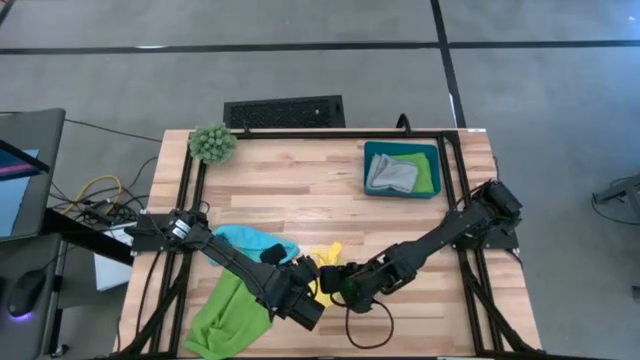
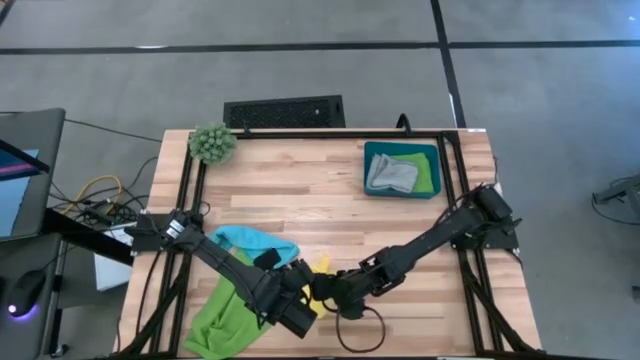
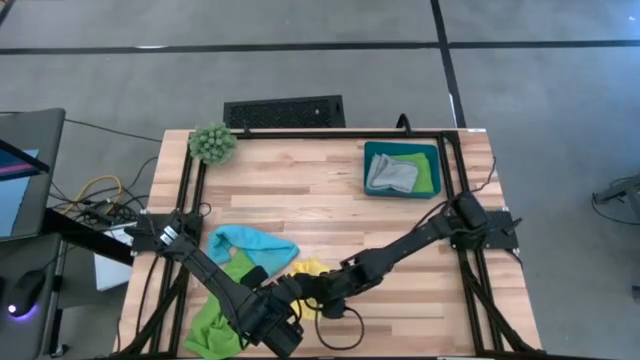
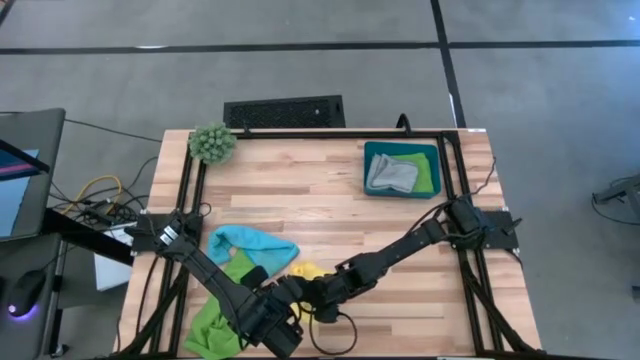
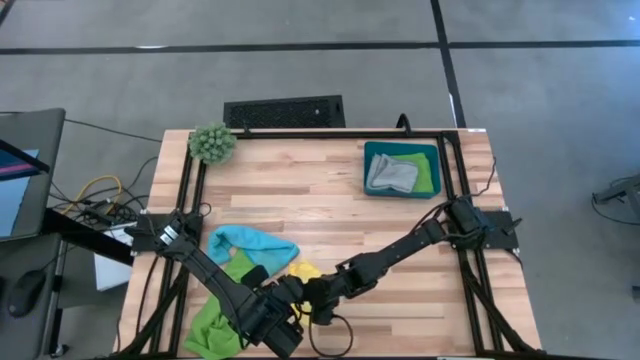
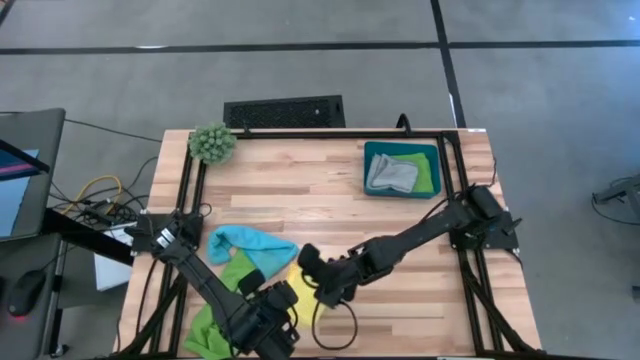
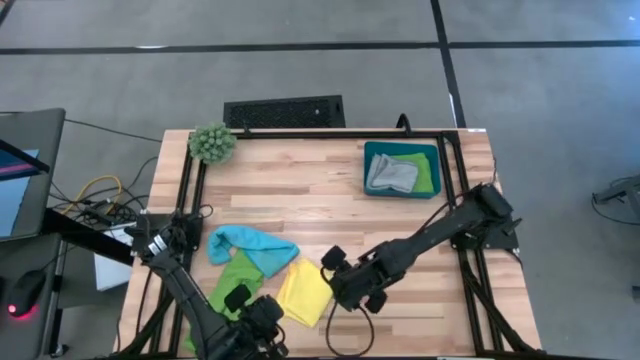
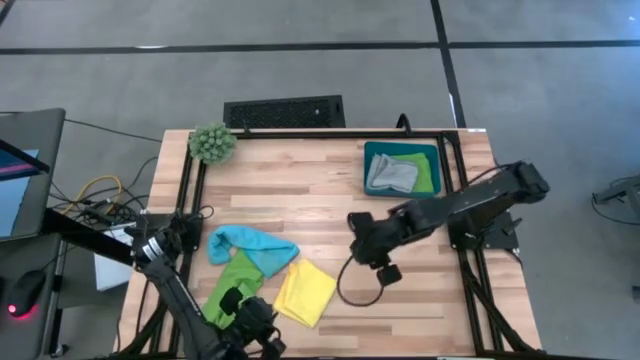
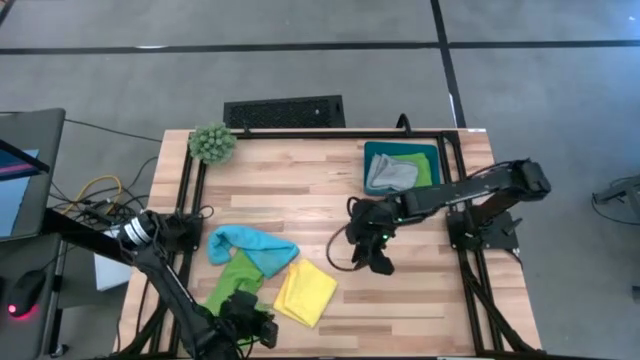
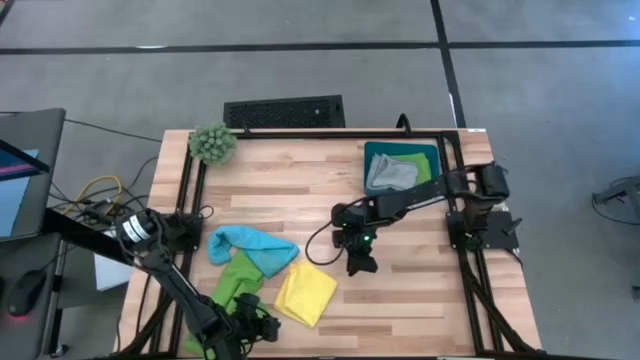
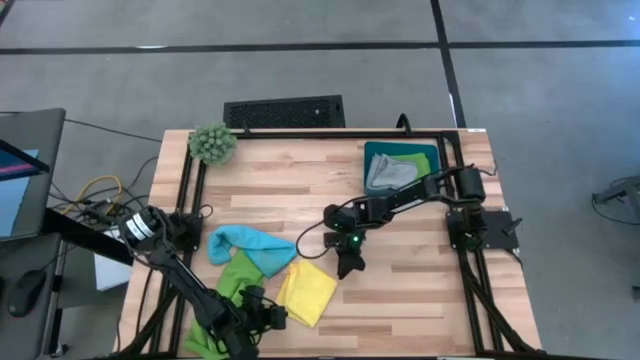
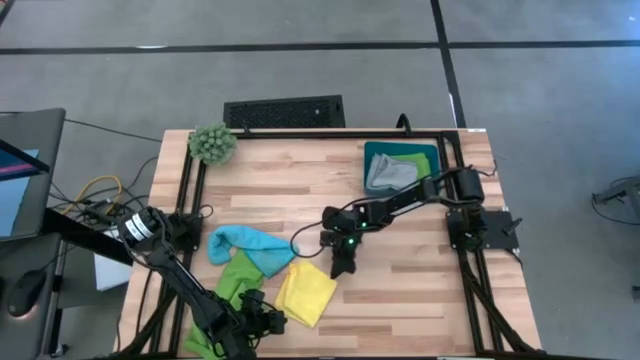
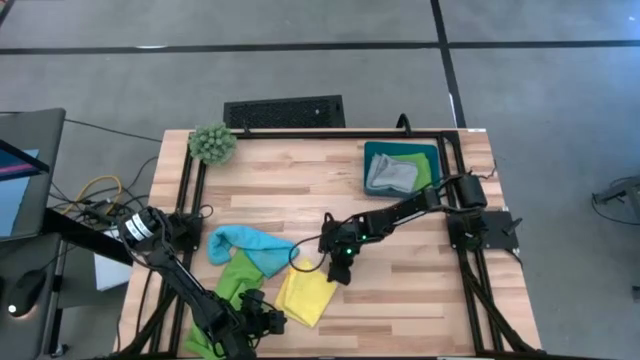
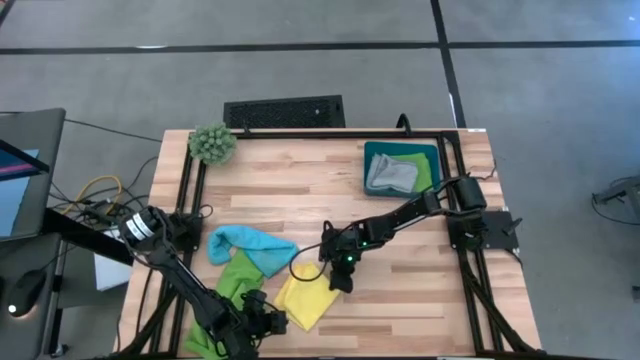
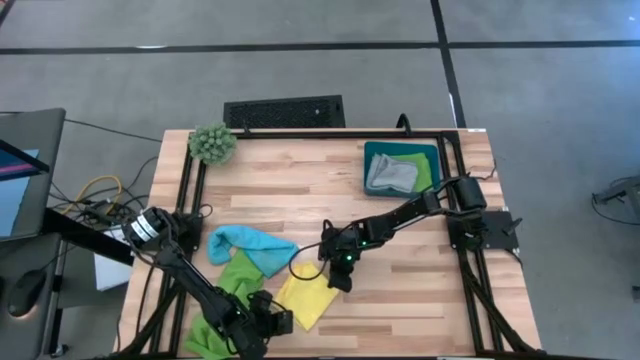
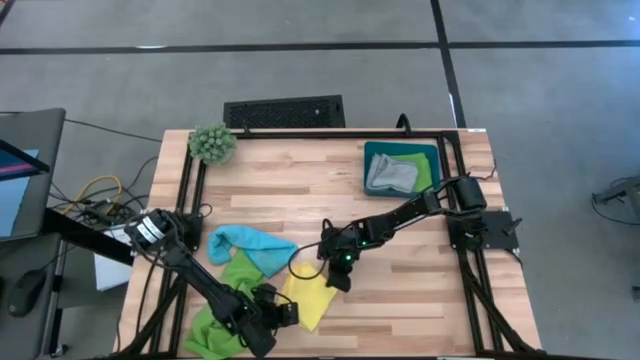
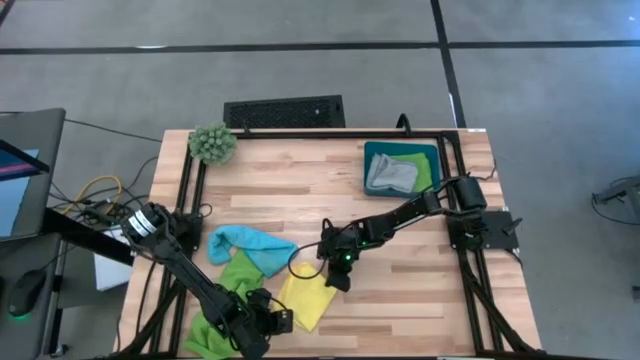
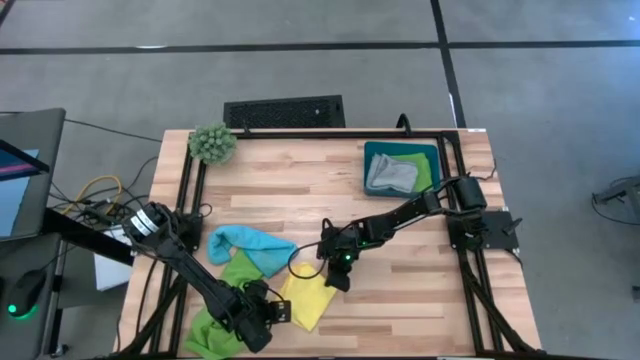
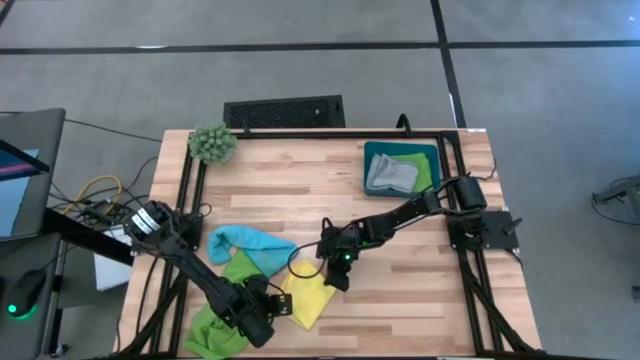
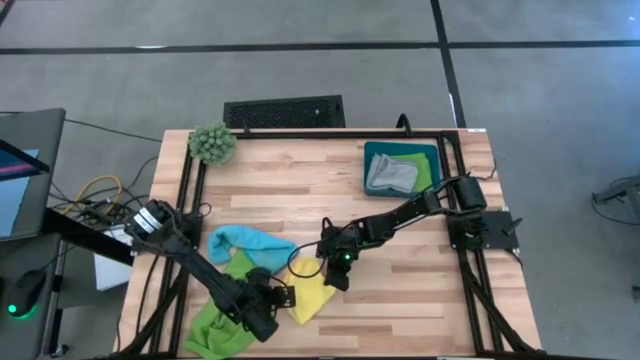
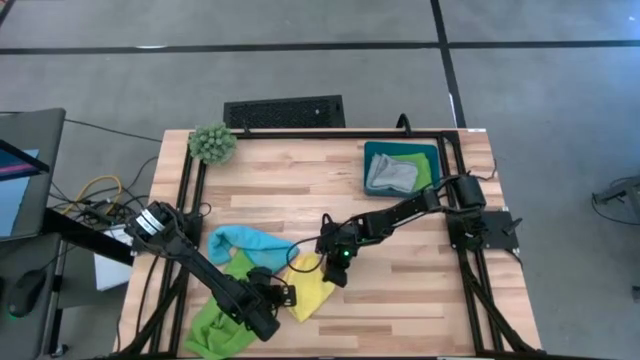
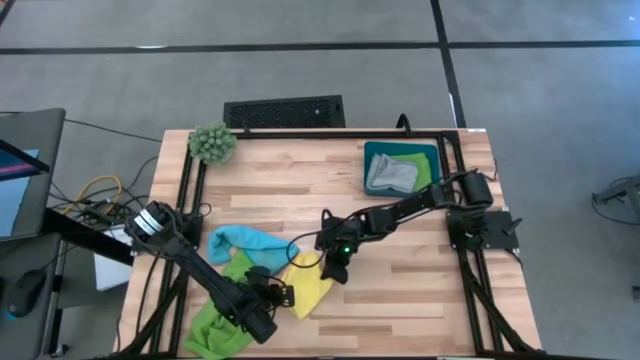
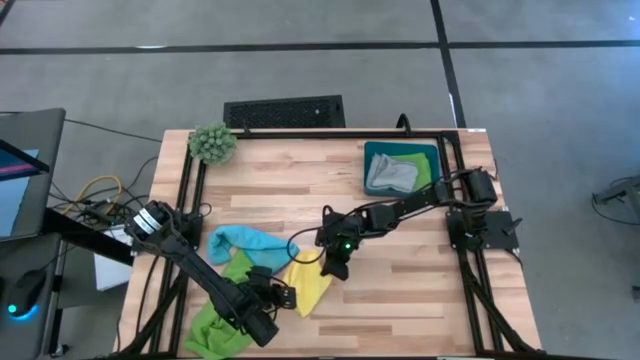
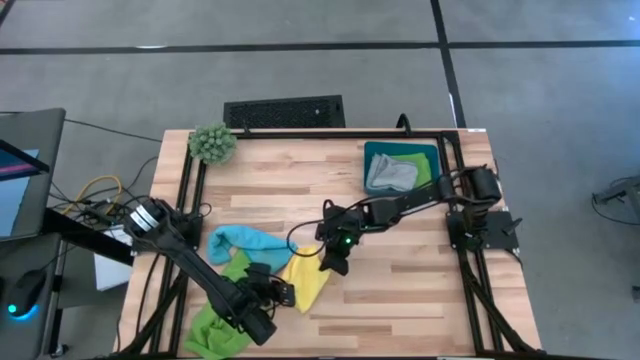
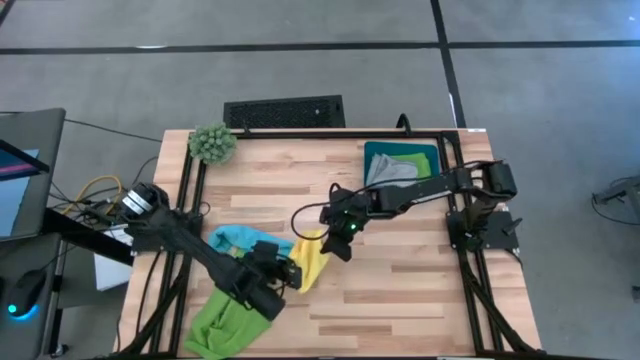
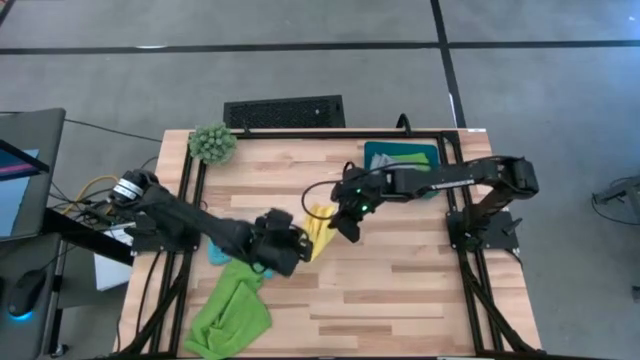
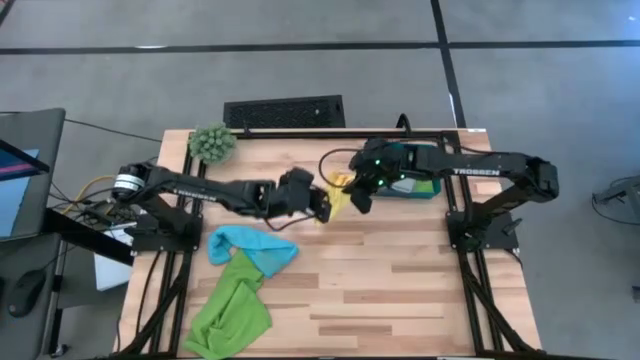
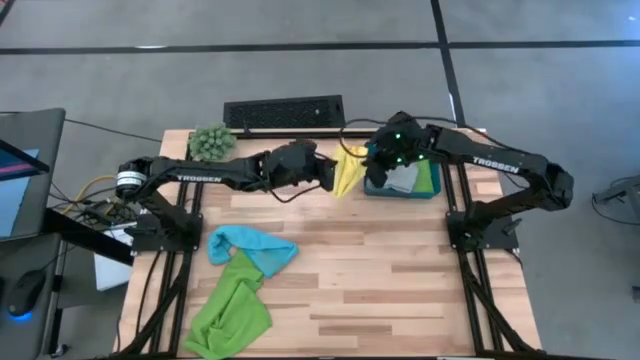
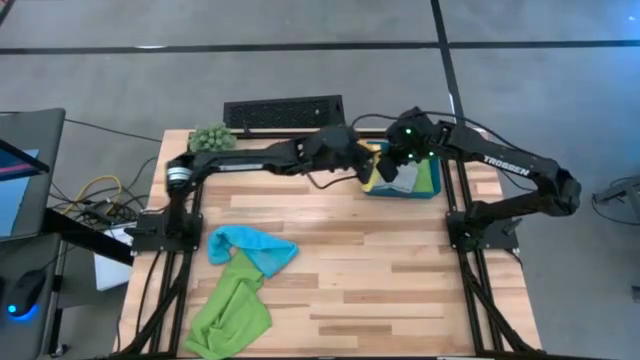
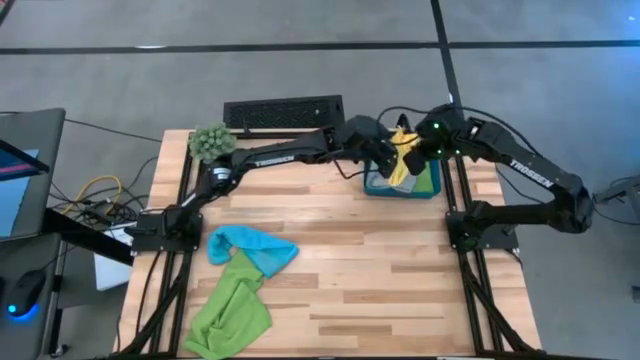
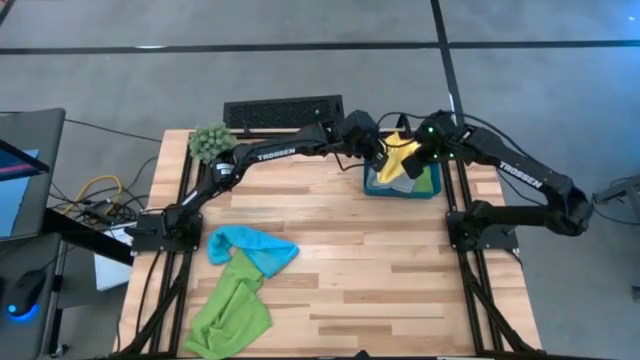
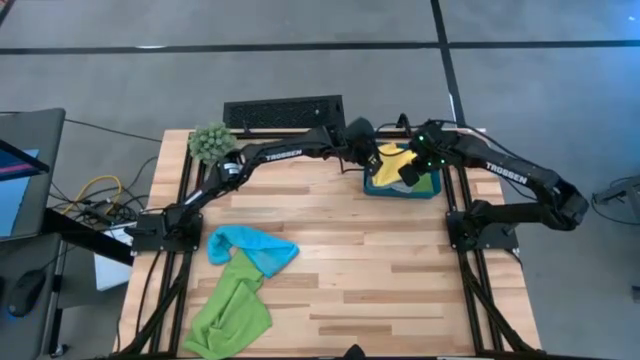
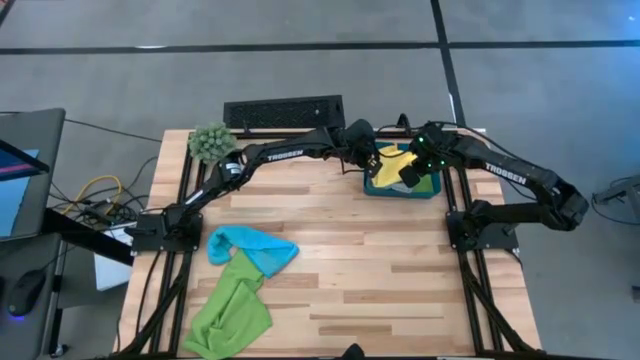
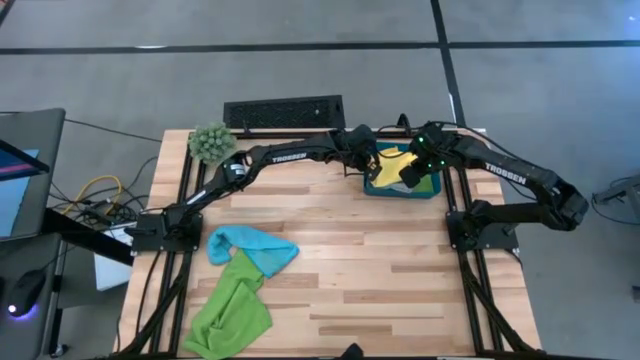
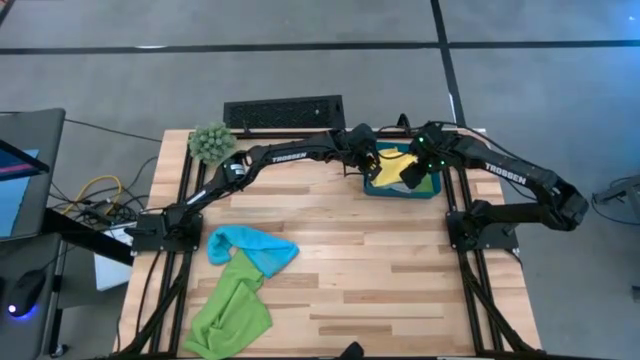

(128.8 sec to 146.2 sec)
Task: Fold microfiber towels
Fold the yellow microfiber cloth

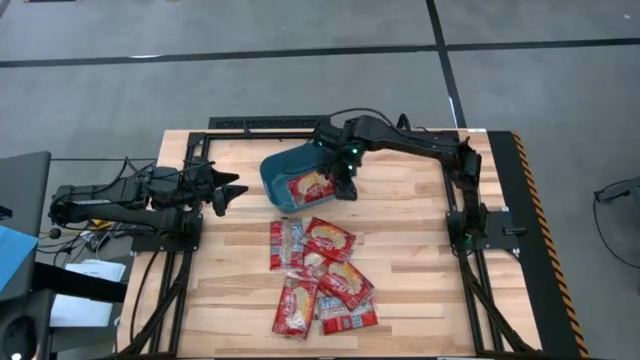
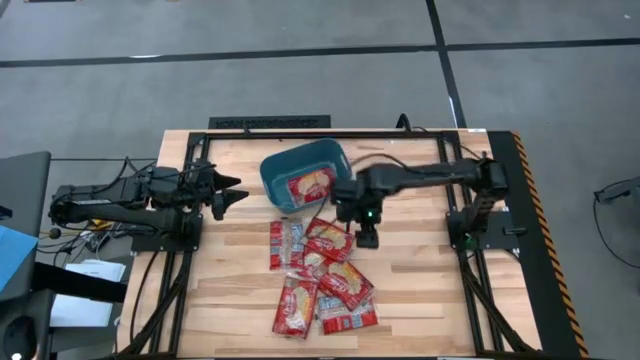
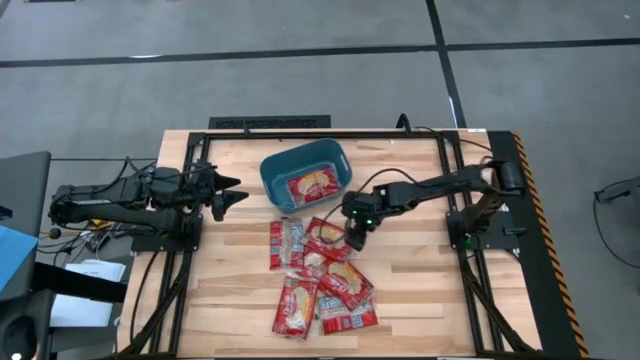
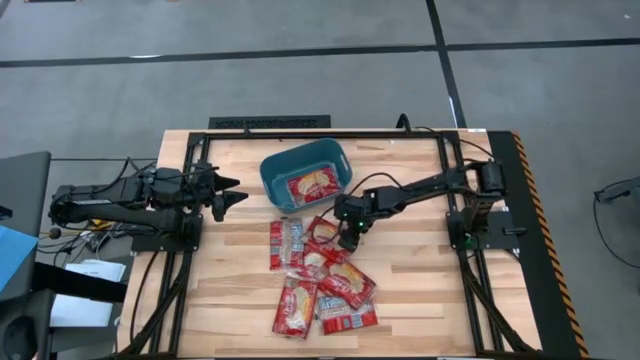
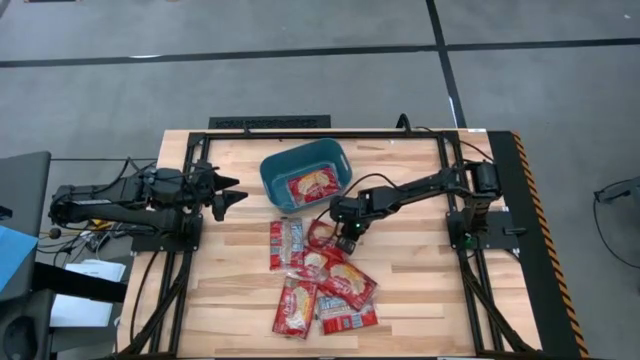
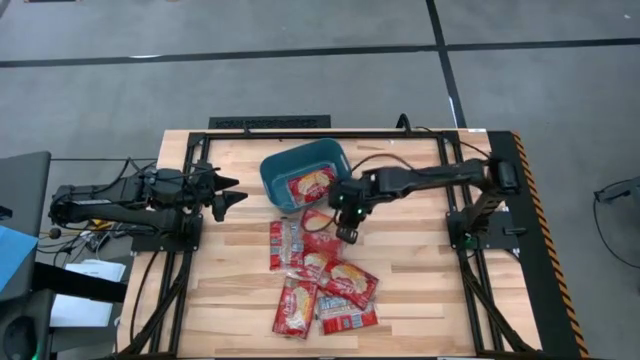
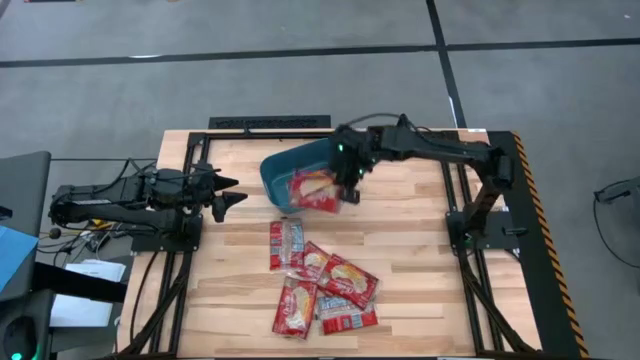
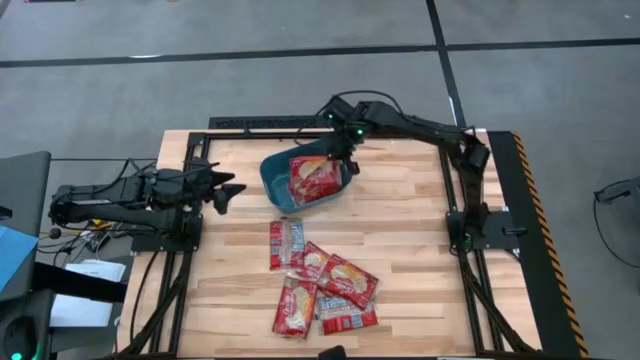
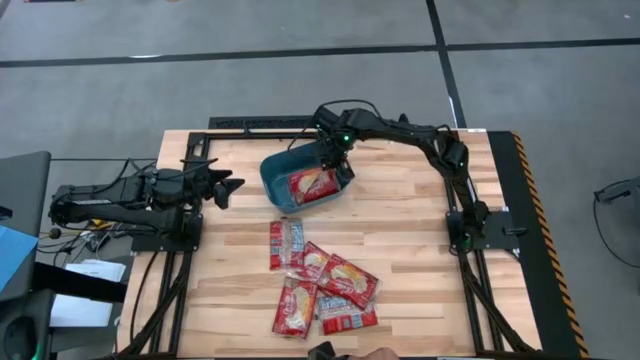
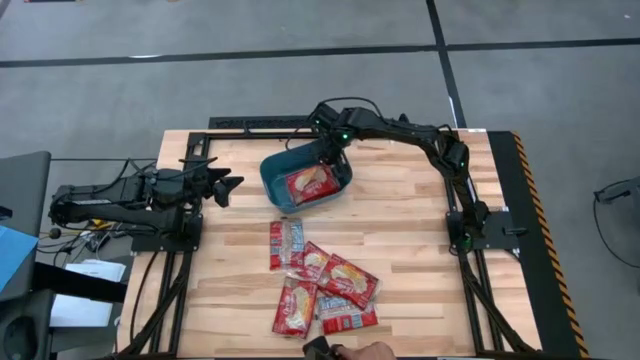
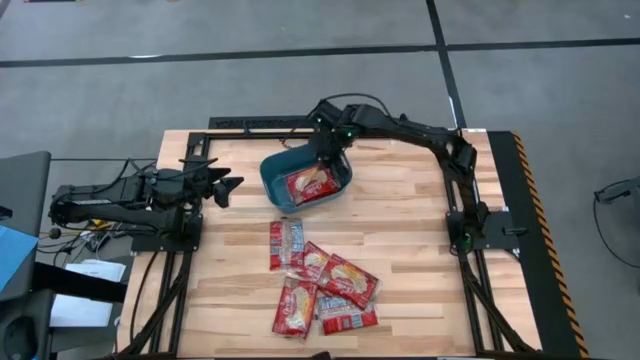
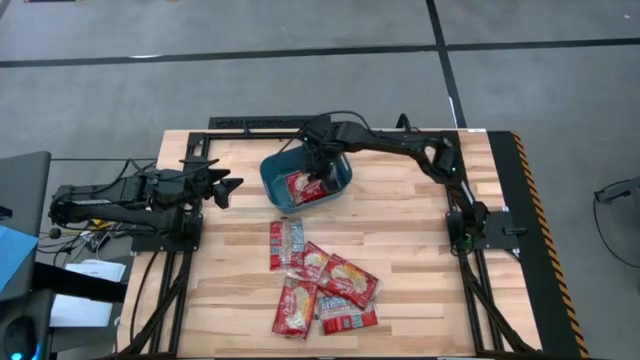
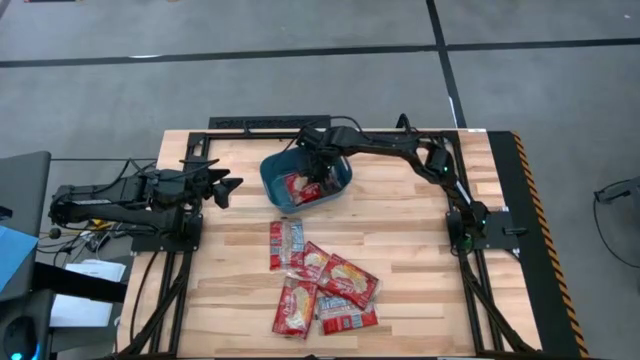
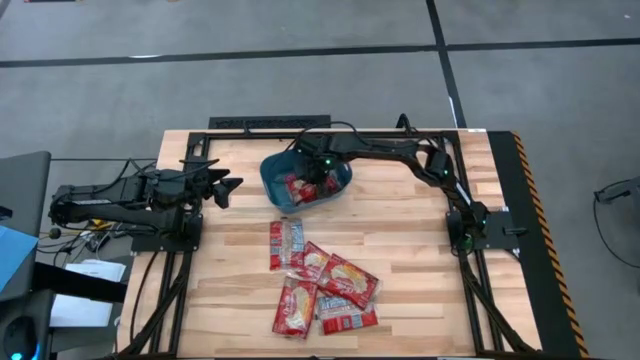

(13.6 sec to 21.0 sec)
Task: Sort popcorn bags into baskets
Put the red popcorn bag into the blue bin
